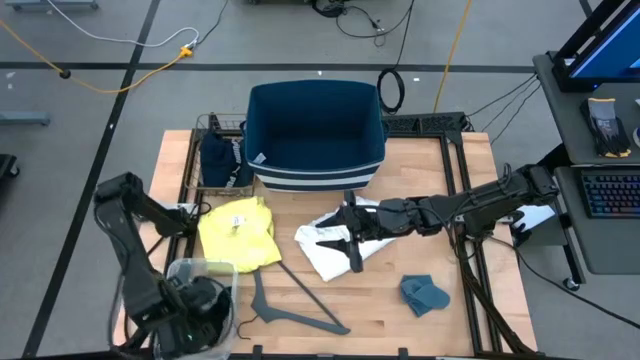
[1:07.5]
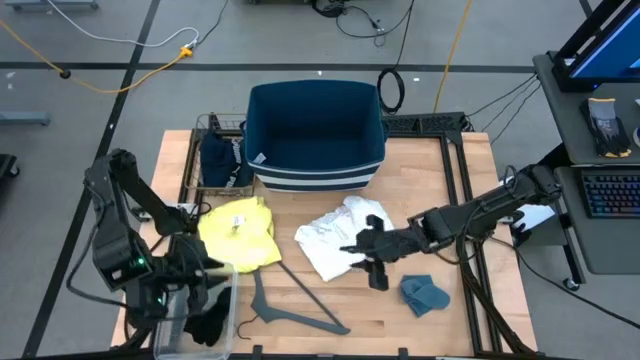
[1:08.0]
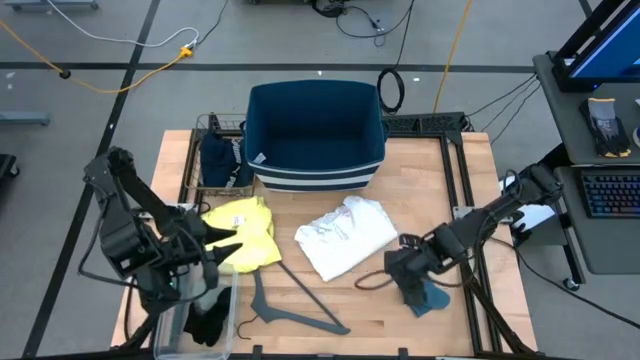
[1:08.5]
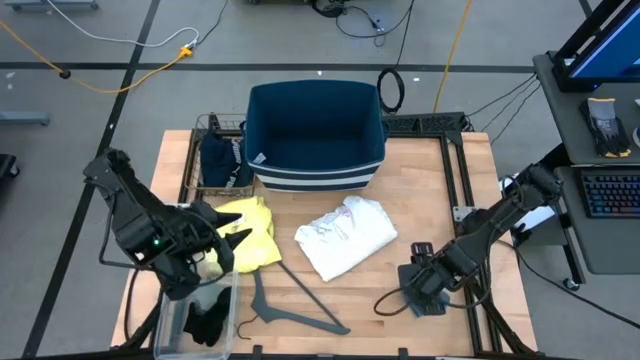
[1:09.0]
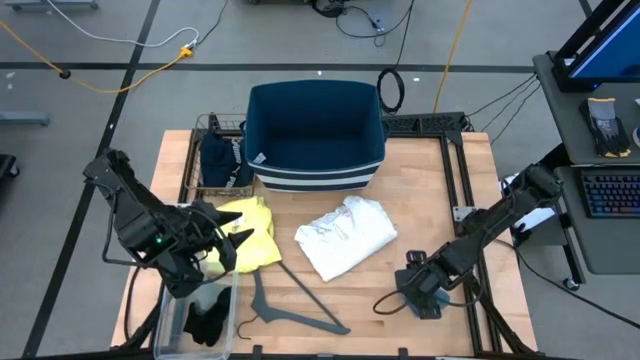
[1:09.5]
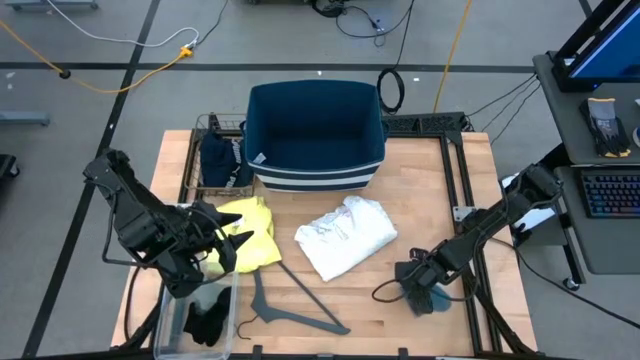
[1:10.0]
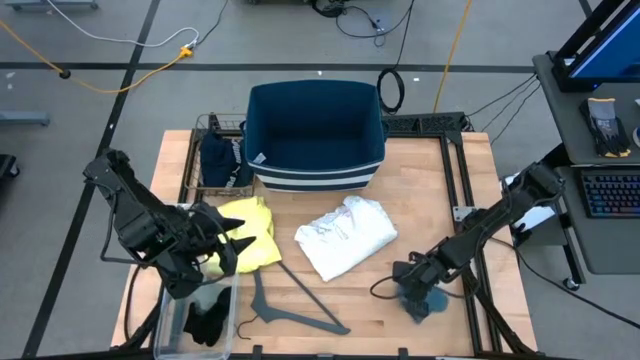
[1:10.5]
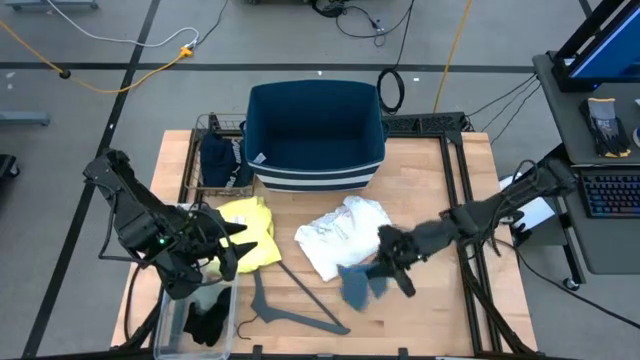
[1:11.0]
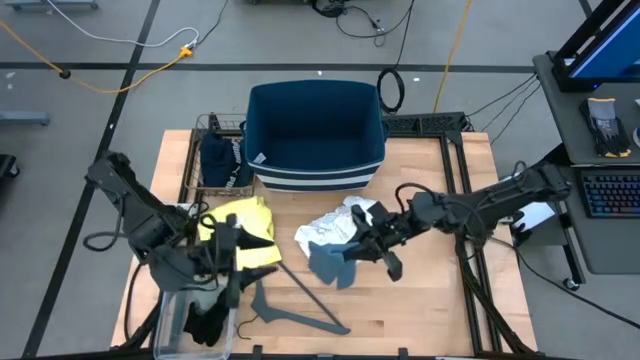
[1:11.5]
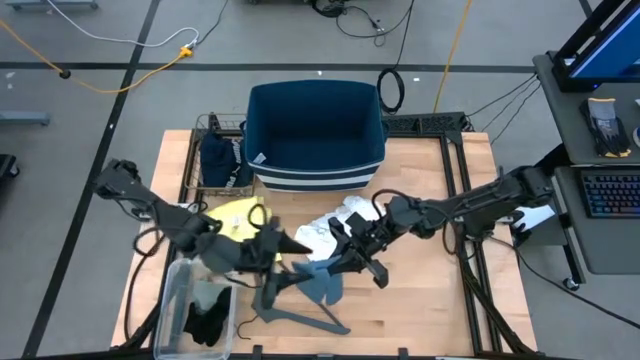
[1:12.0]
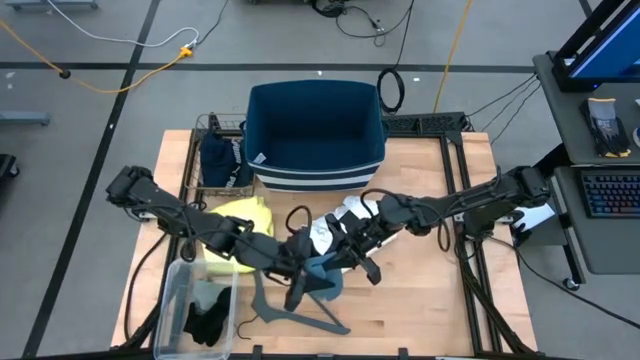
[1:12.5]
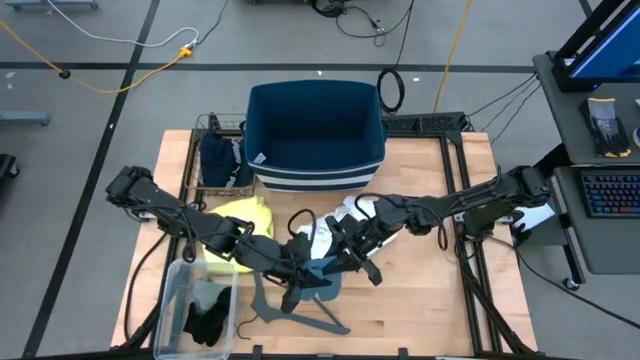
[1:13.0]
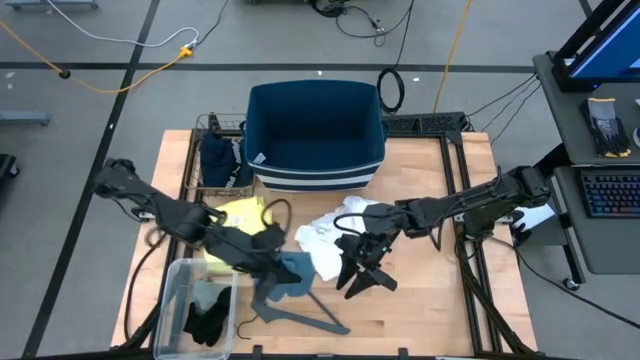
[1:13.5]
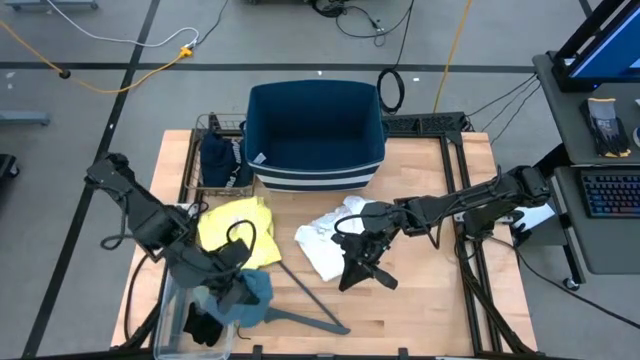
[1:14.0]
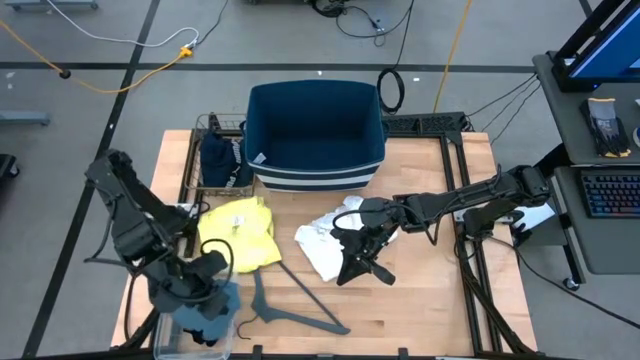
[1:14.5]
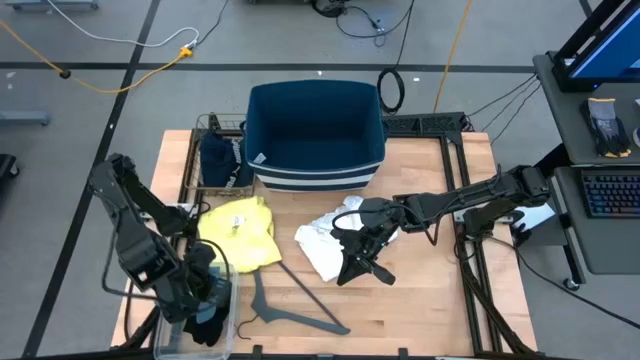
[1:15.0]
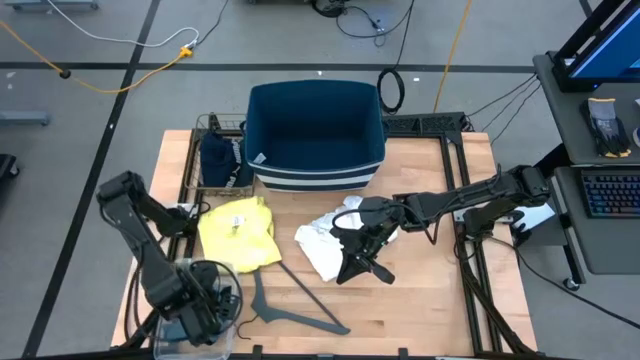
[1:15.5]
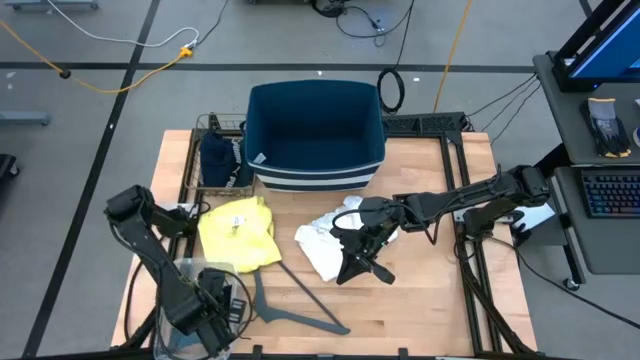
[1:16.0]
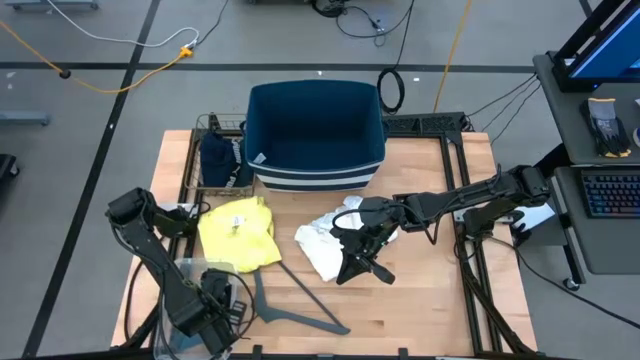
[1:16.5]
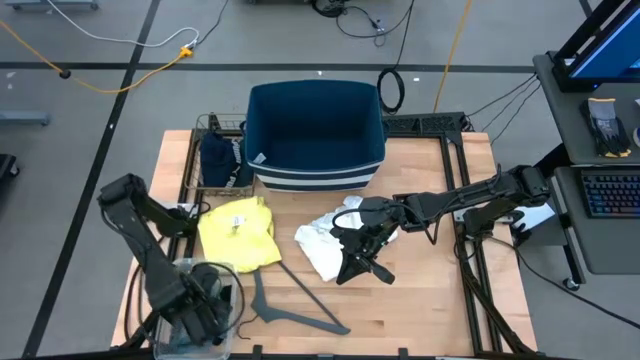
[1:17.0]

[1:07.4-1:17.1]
Task: Pick & Place Cloths
Put the dark gray sock into the transparent bin

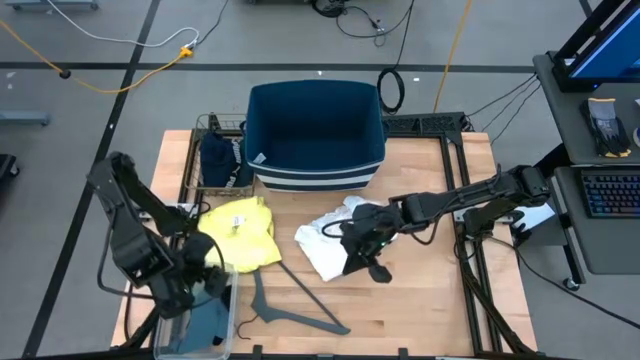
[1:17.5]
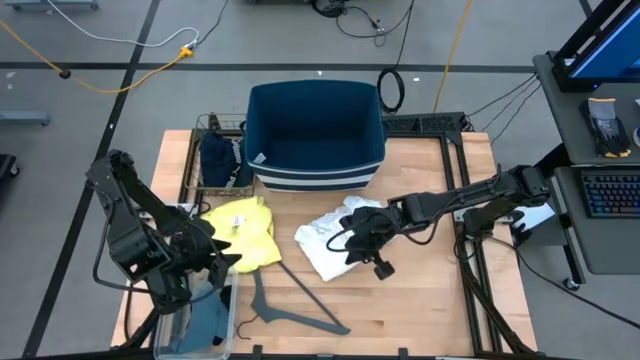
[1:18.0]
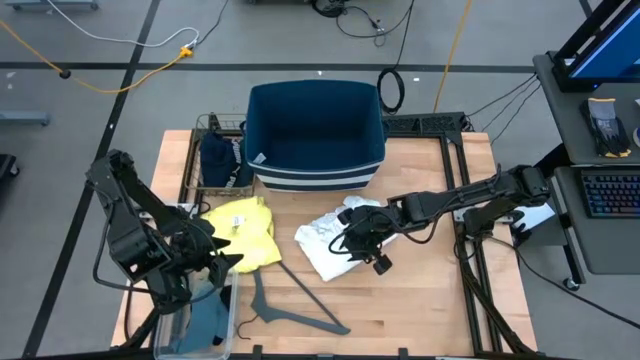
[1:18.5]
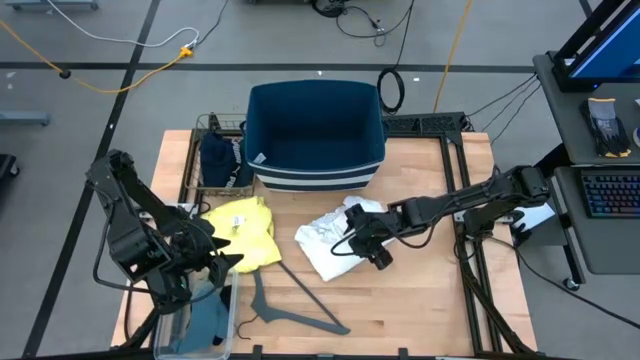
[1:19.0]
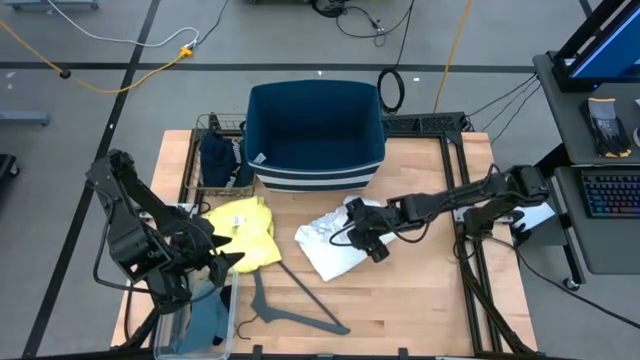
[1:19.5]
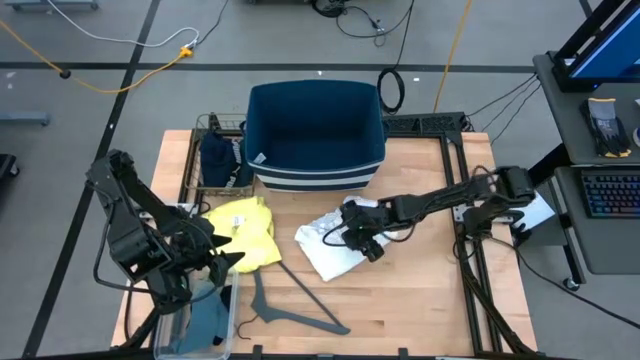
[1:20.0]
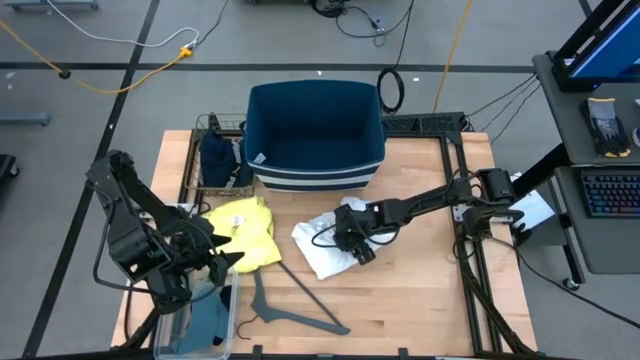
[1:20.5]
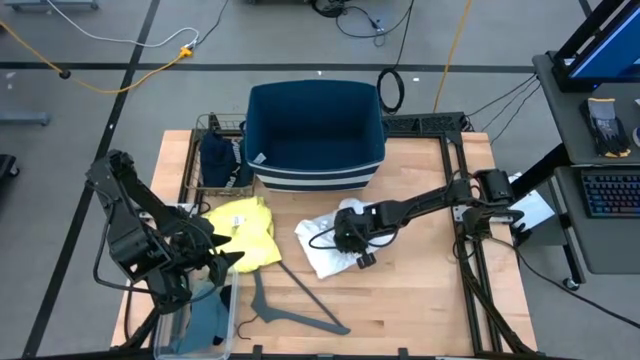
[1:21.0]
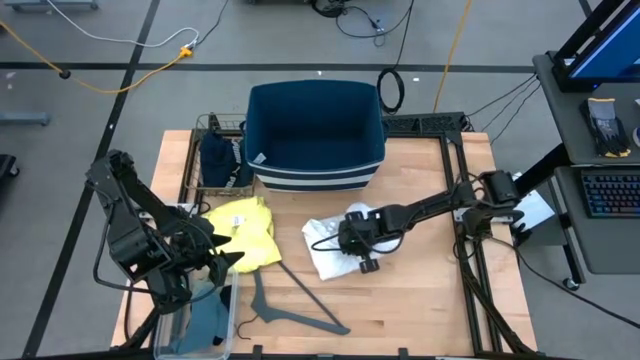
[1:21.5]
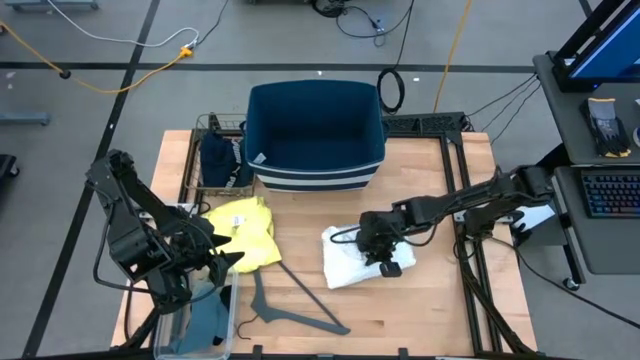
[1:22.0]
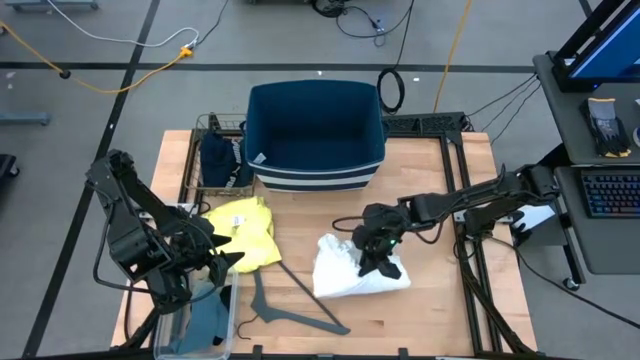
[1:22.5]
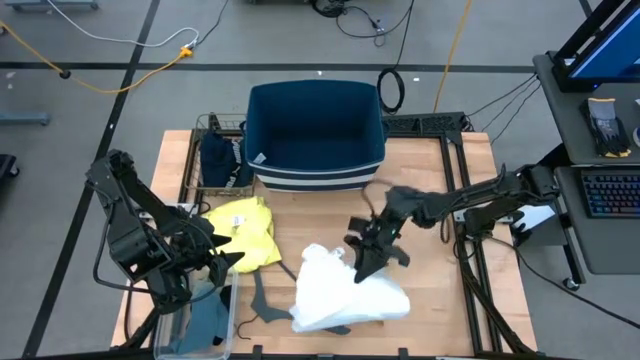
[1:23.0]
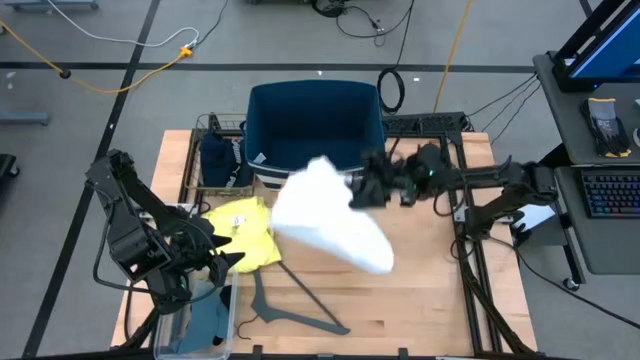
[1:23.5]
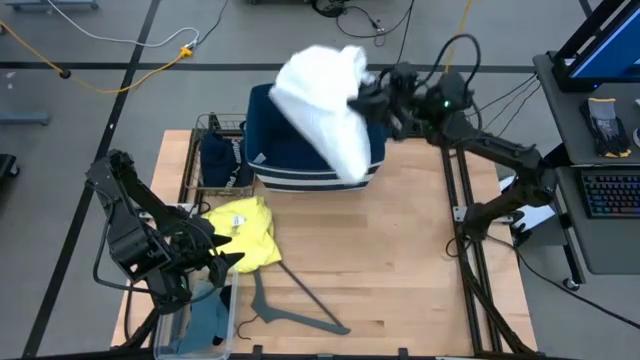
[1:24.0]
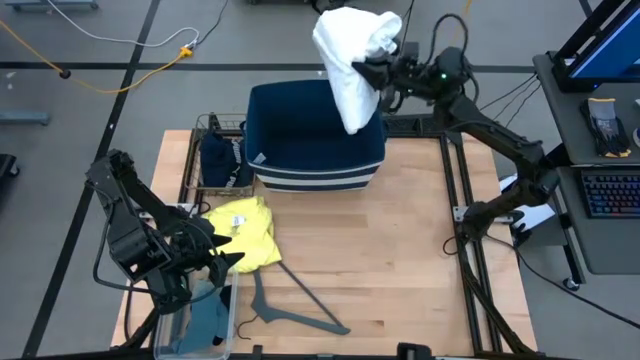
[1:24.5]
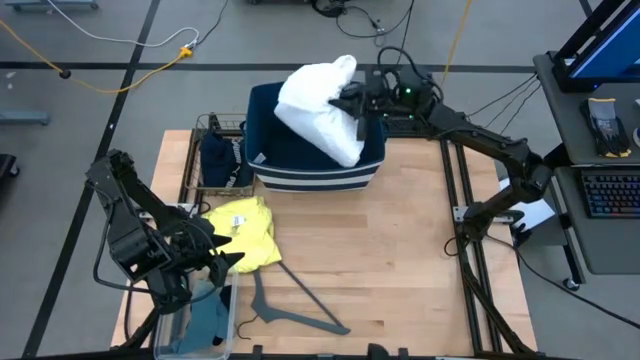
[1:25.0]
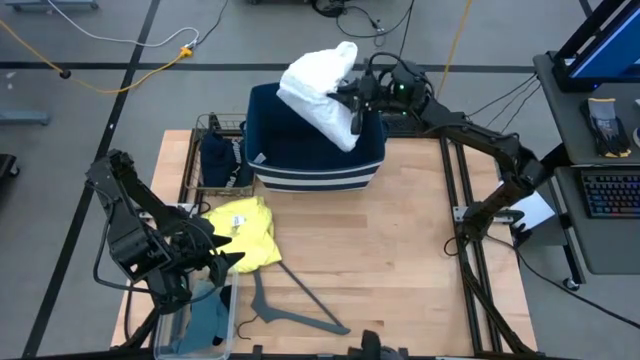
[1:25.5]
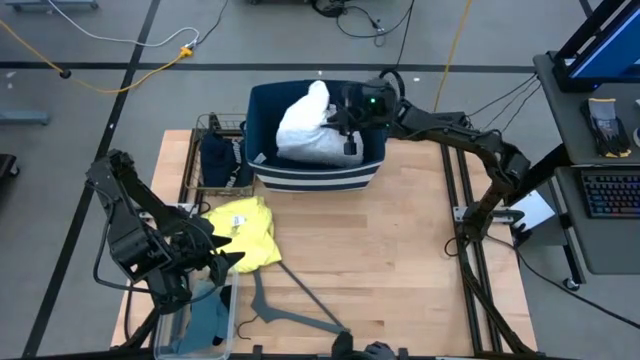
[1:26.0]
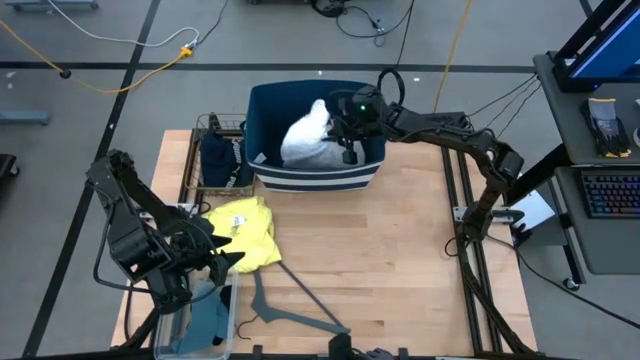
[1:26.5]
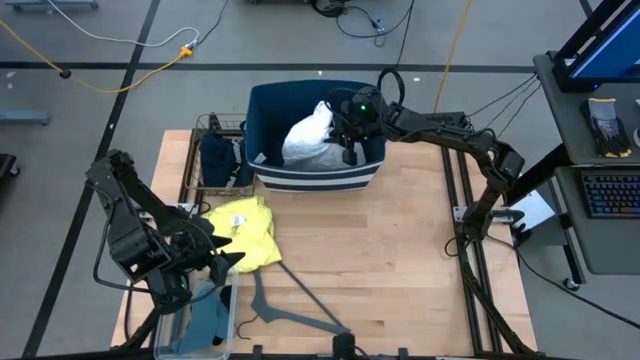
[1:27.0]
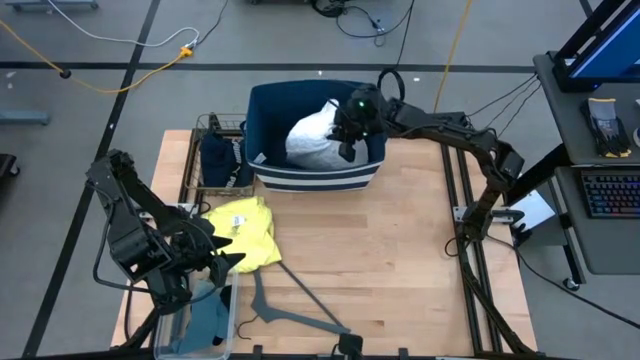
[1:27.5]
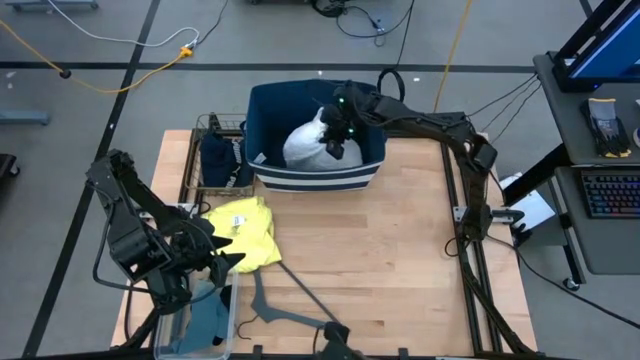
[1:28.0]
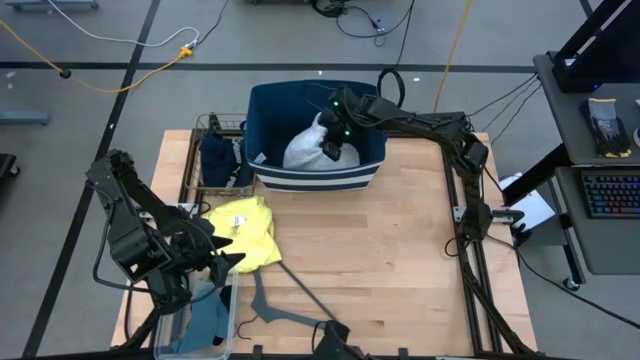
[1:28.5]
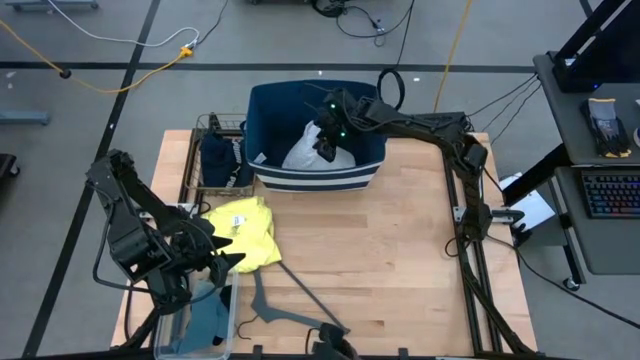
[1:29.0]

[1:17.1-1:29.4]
Put the white shirt into the blue laundry bin
